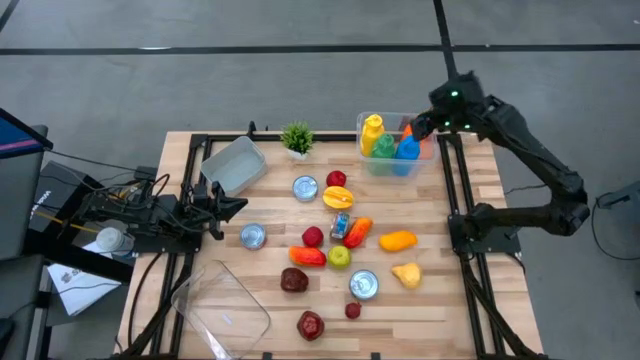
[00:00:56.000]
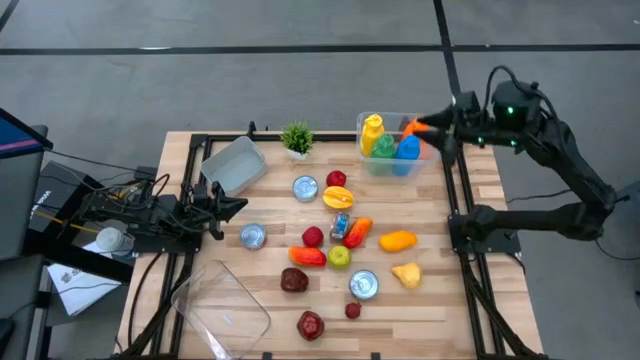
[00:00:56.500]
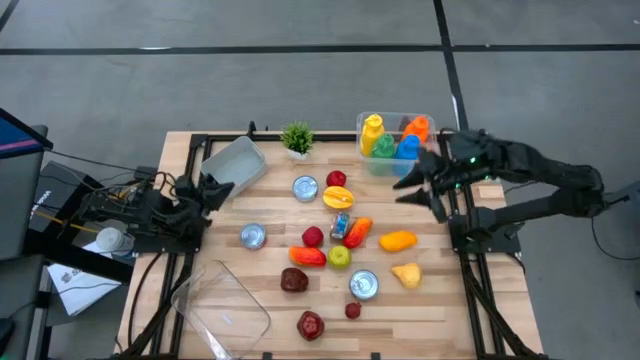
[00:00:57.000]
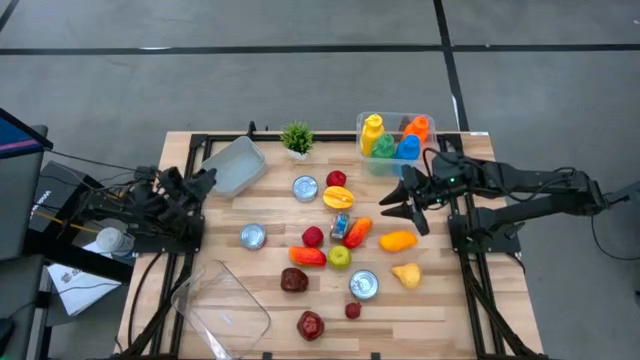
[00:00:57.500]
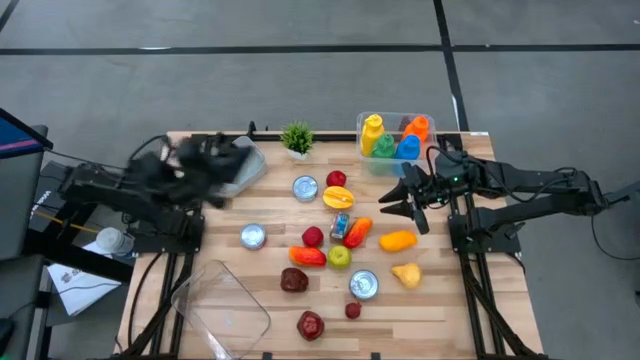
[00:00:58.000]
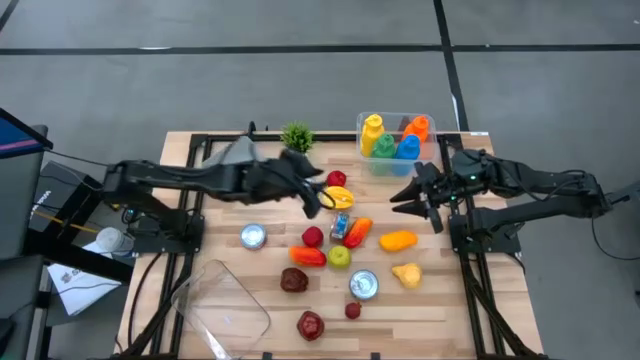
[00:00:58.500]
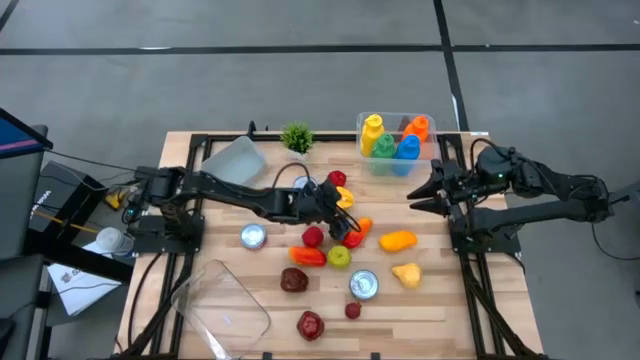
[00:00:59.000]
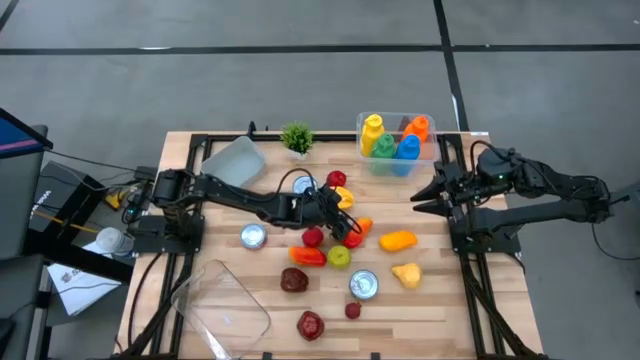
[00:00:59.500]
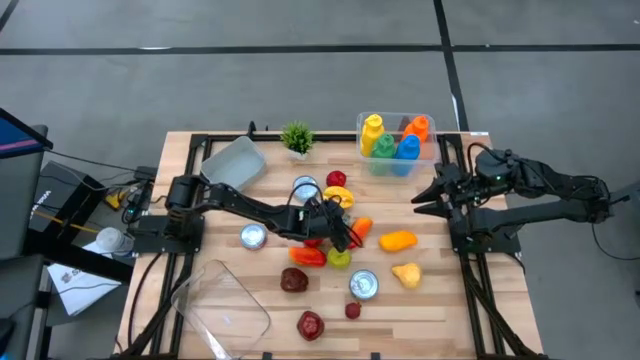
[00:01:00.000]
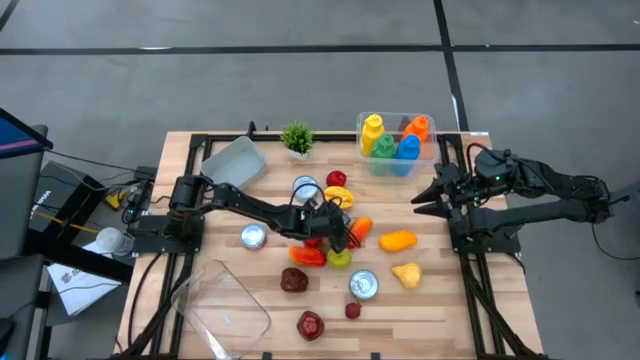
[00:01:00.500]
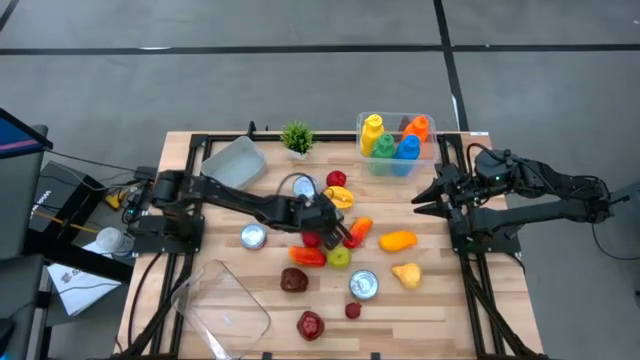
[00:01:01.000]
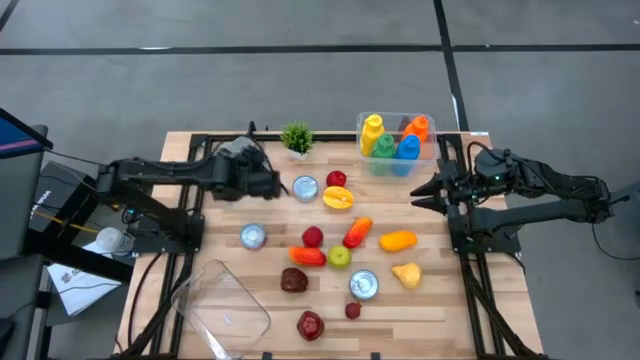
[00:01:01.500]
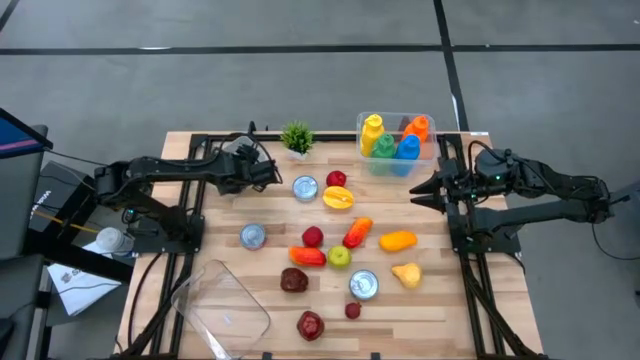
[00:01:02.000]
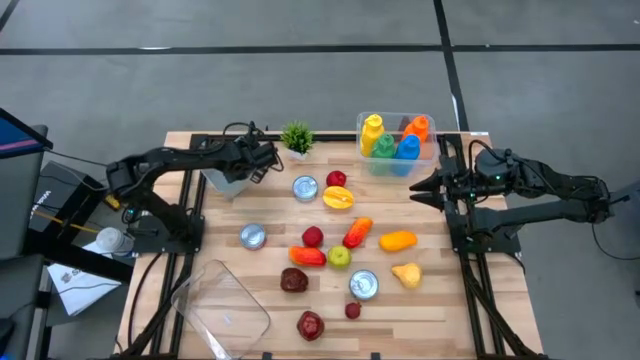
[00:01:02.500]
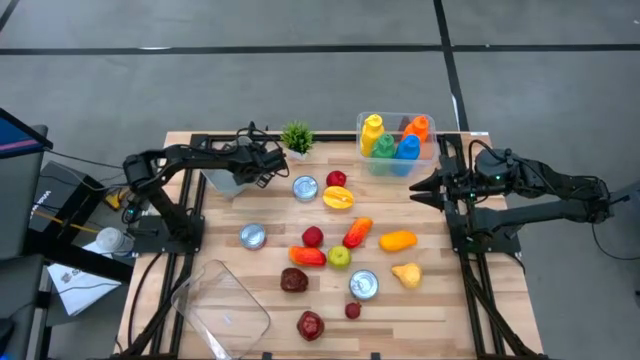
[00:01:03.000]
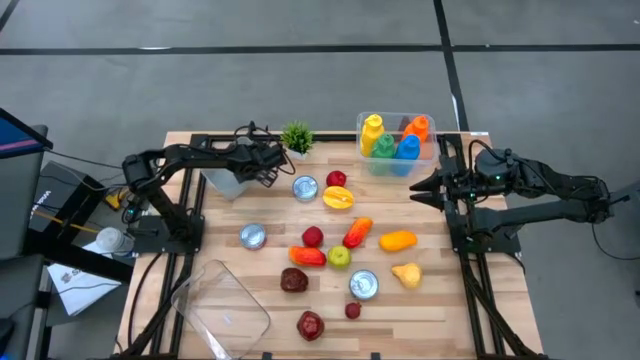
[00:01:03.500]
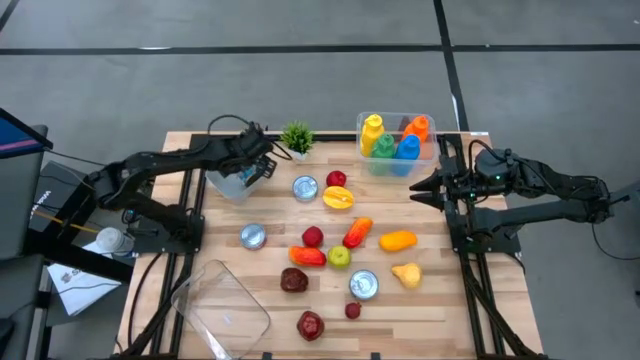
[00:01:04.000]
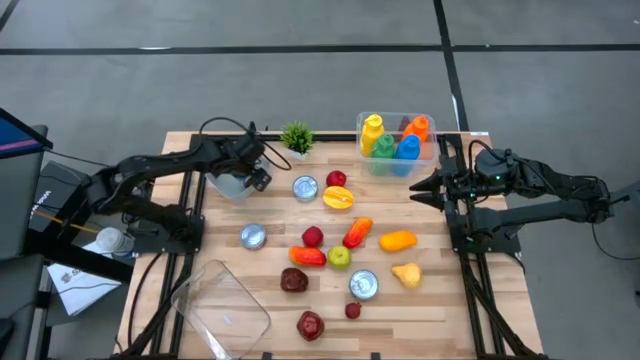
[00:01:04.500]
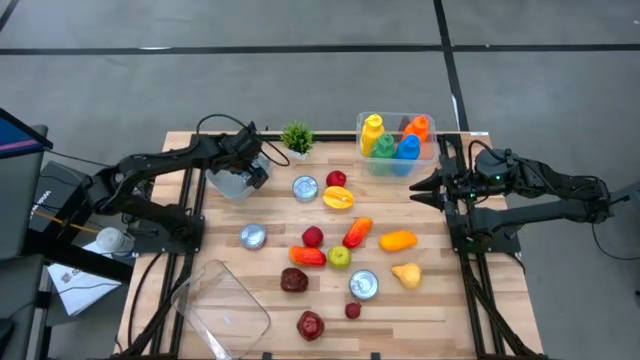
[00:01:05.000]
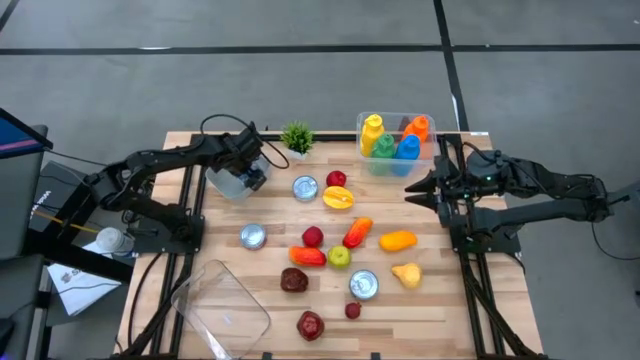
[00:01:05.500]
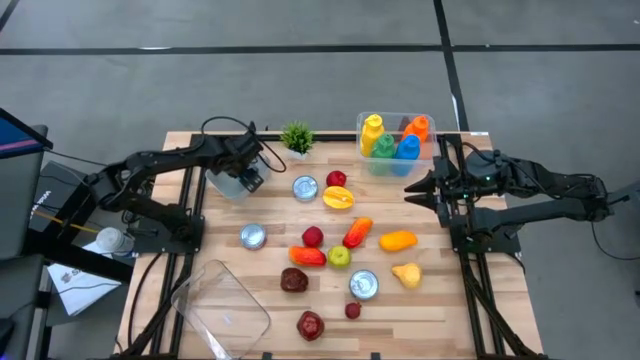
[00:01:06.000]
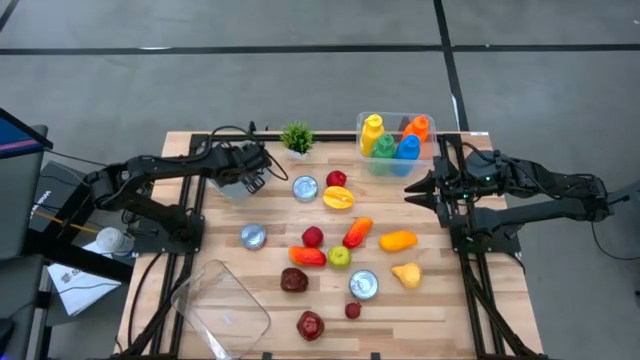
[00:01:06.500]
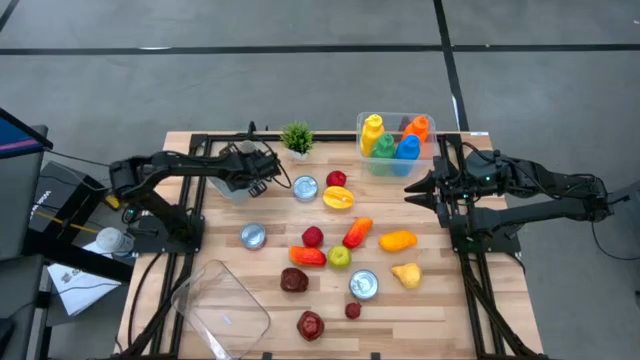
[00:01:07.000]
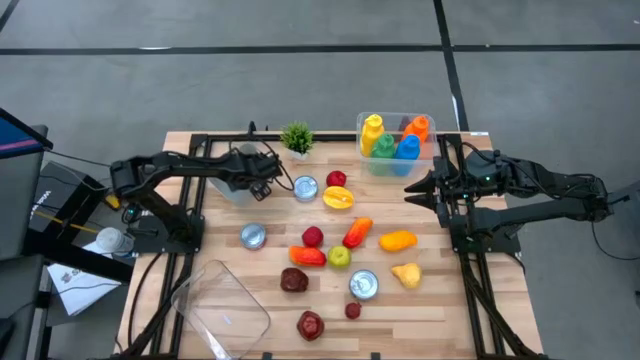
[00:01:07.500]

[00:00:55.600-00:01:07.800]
Task: Pick & Place Food Item
Put the blue and pink tuna can into the gray bin

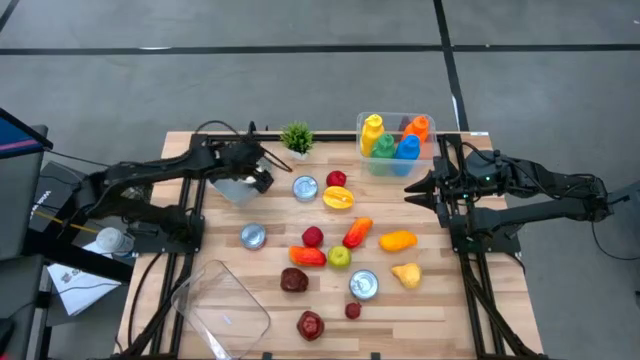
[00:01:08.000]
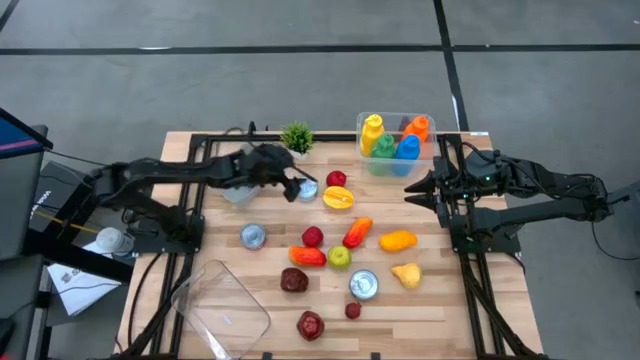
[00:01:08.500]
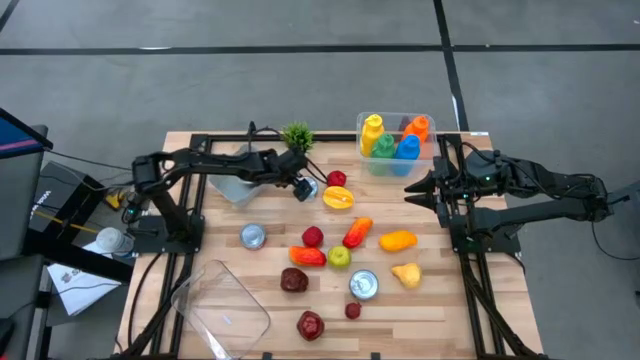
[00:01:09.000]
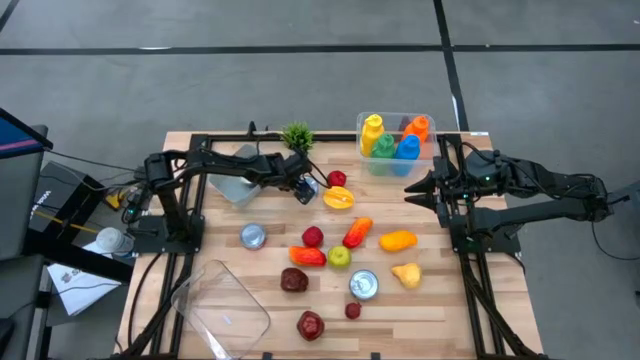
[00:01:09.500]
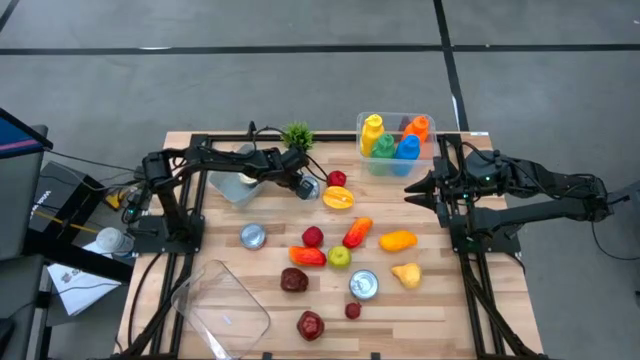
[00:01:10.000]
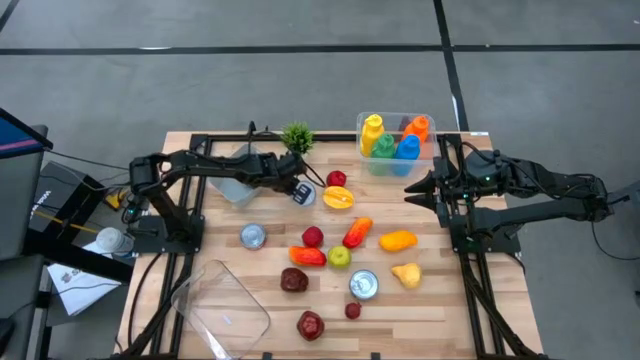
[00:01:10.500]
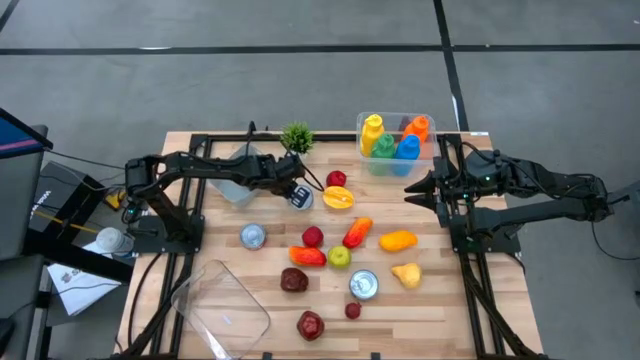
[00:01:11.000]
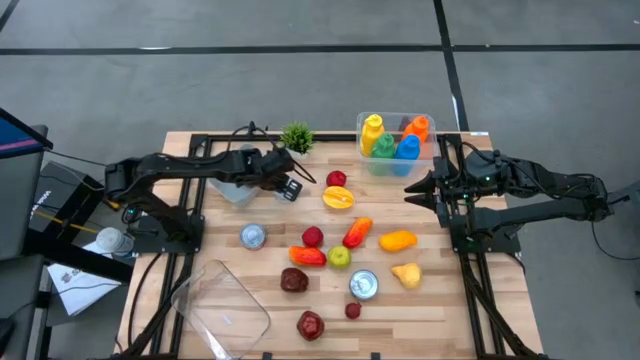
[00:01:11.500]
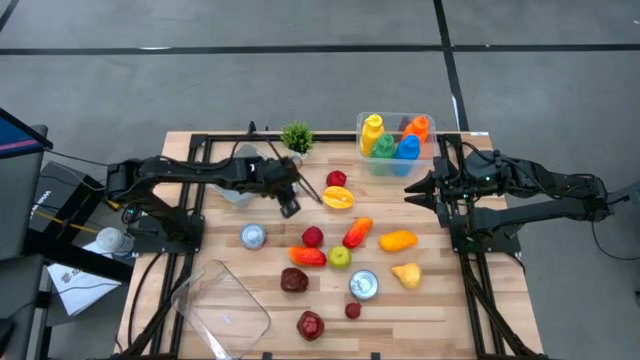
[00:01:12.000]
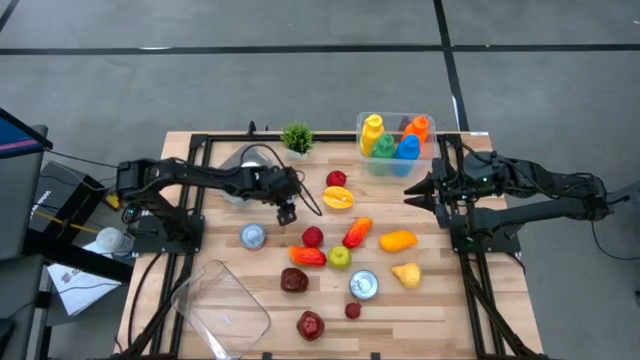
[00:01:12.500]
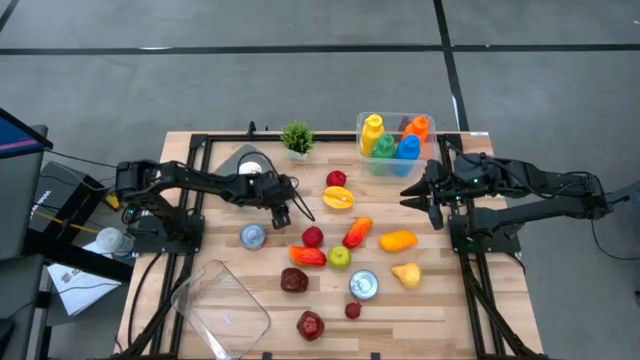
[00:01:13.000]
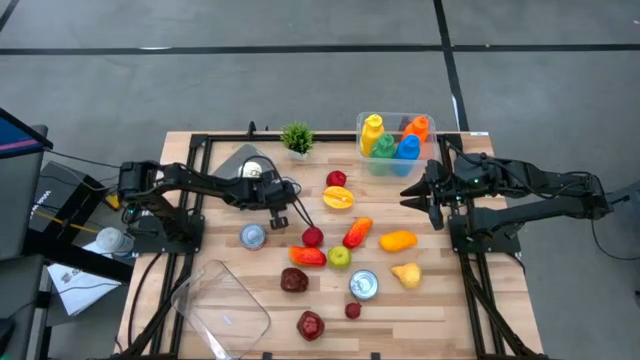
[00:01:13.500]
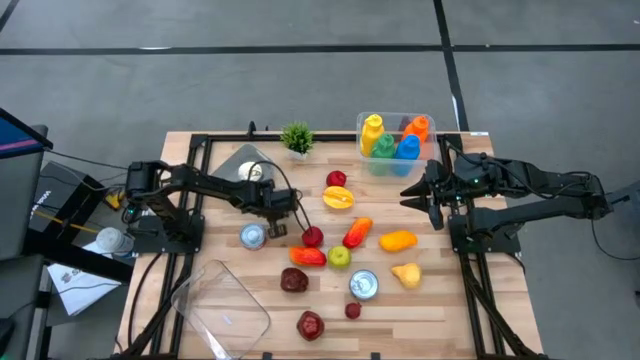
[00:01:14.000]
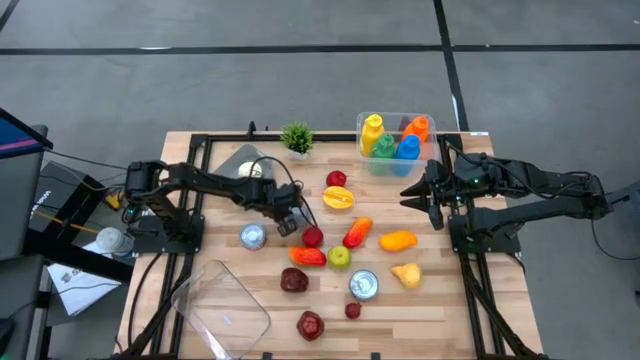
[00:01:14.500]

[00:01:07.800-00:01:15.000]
Put the green tuna can into the gray bin

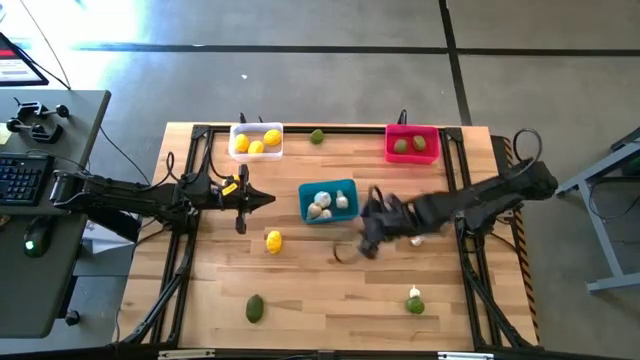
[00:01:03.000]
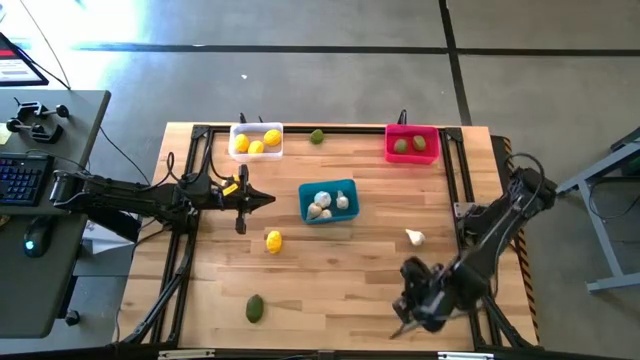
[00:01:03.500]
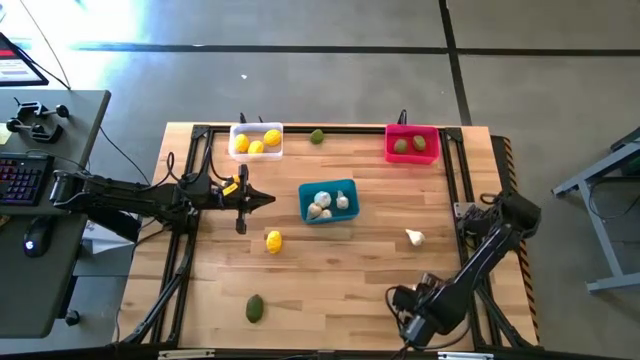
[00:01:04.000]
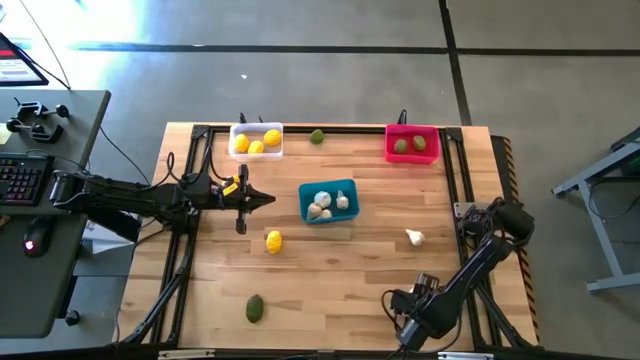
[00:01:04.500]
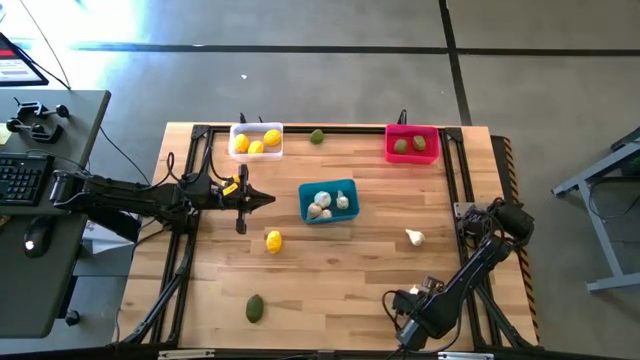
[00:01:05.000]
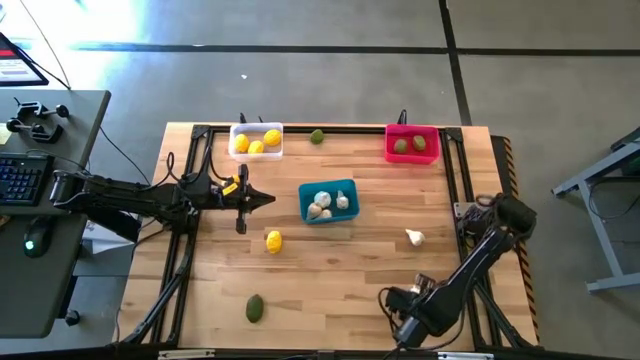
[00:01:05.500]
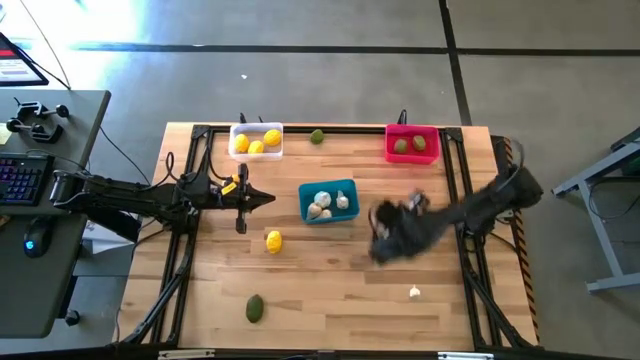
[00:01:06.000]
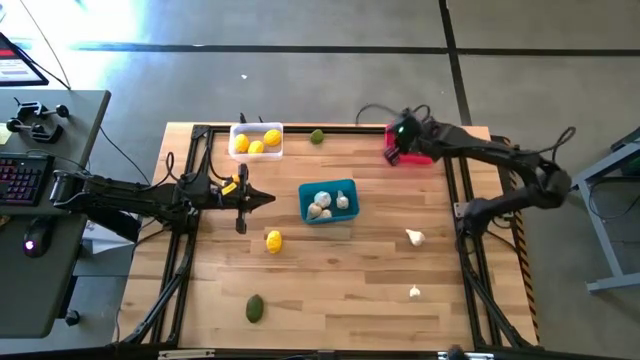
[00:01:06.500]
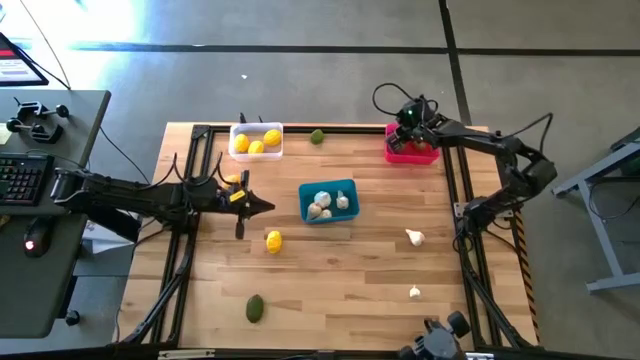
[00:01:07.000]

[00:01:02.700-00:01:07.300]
Task: Sort produce into baskets
Put the green lime into the pink bin
